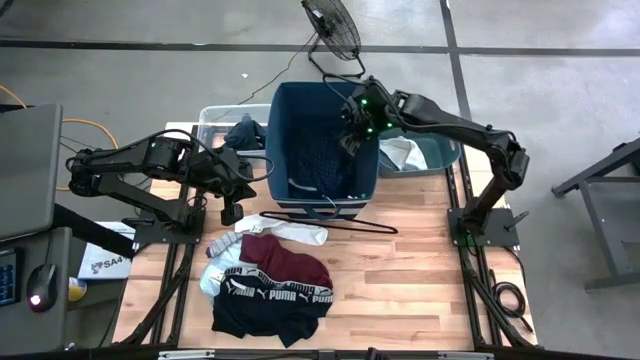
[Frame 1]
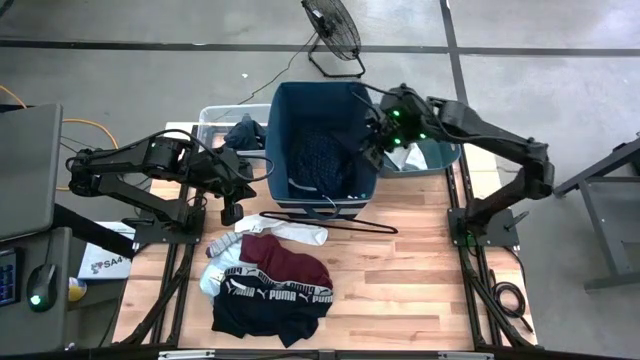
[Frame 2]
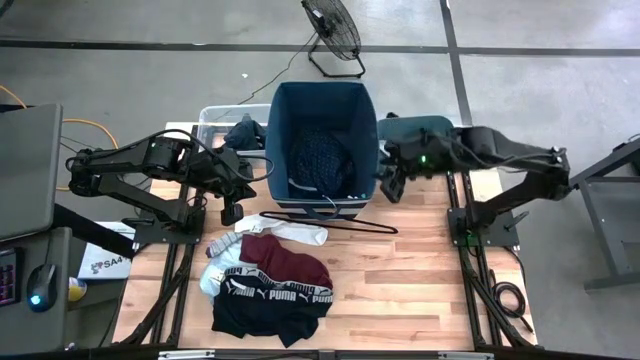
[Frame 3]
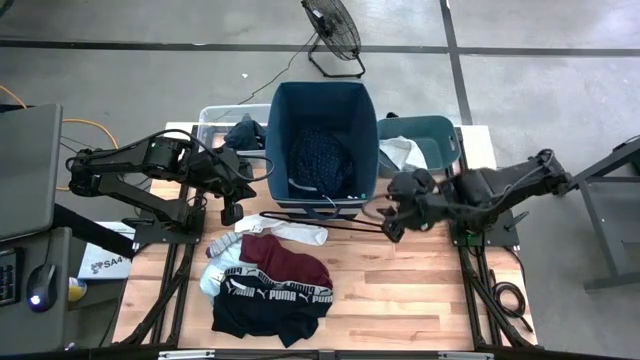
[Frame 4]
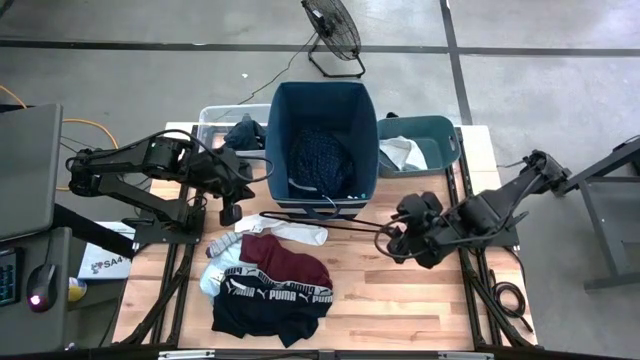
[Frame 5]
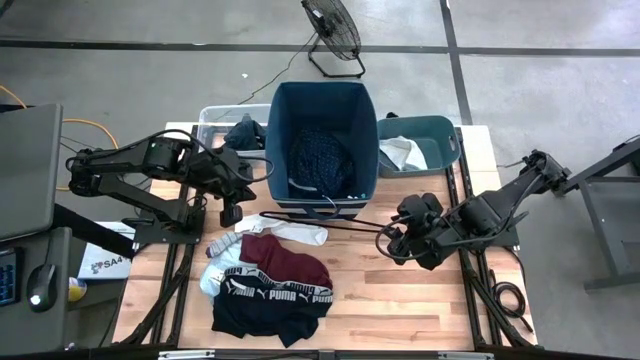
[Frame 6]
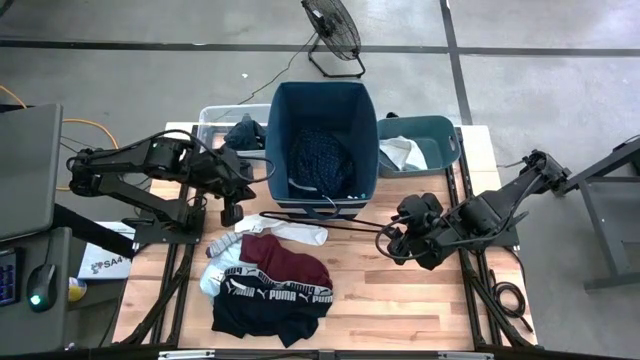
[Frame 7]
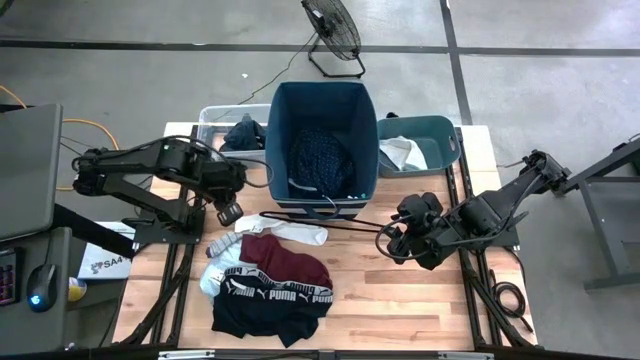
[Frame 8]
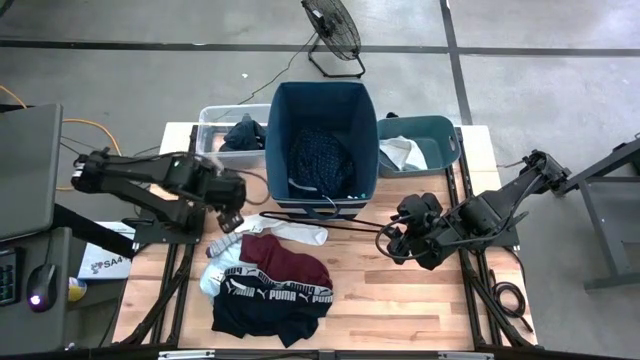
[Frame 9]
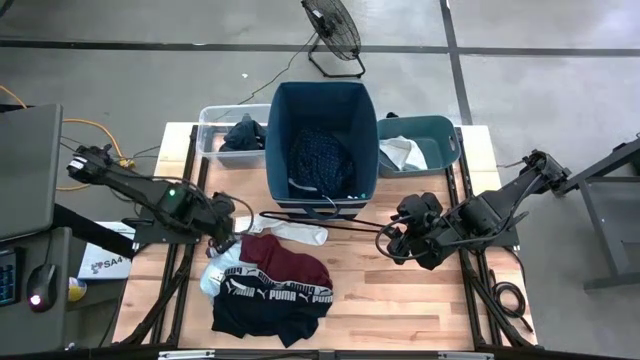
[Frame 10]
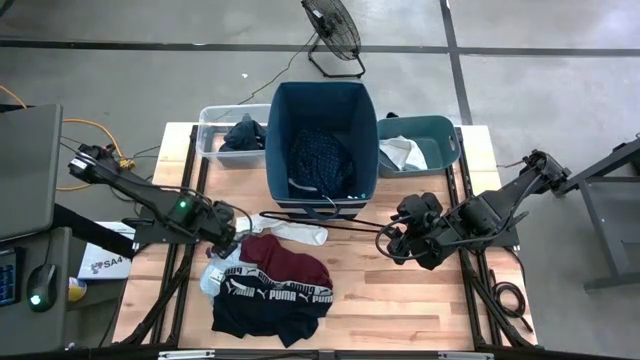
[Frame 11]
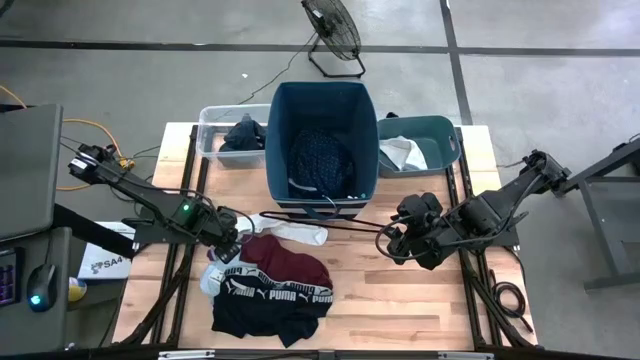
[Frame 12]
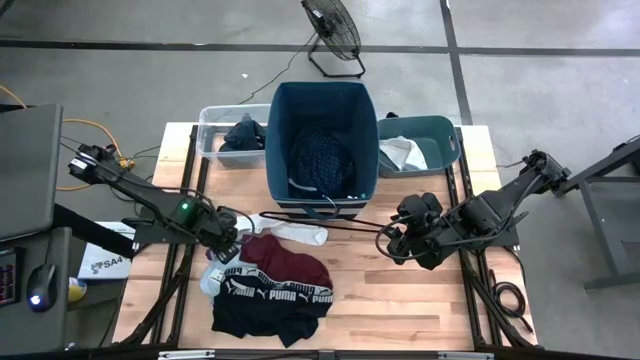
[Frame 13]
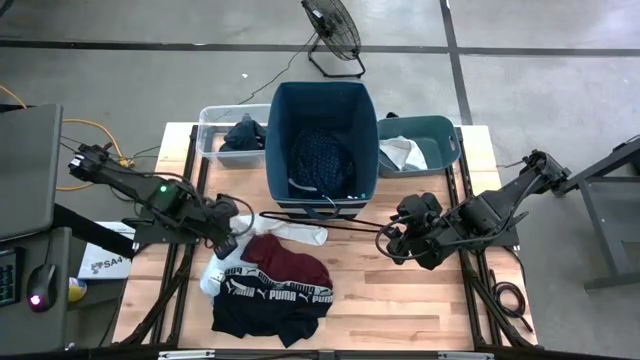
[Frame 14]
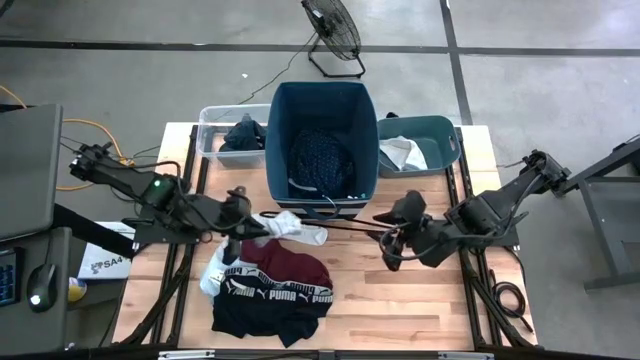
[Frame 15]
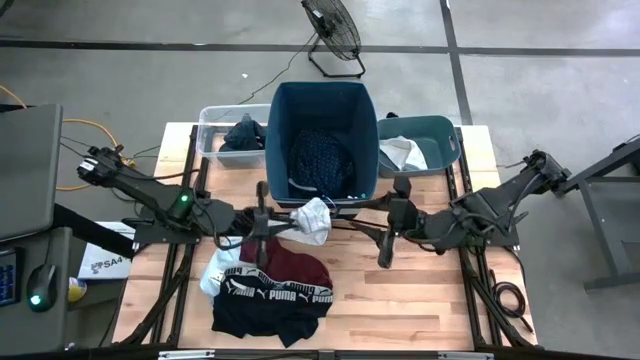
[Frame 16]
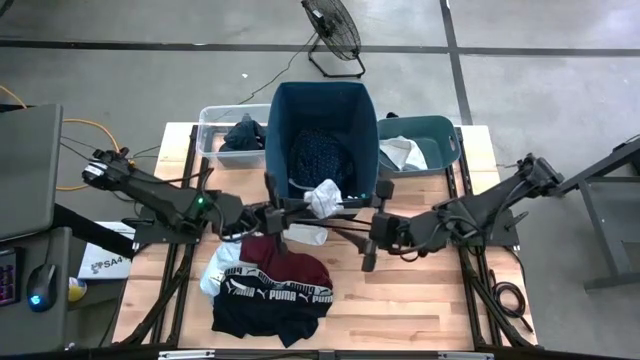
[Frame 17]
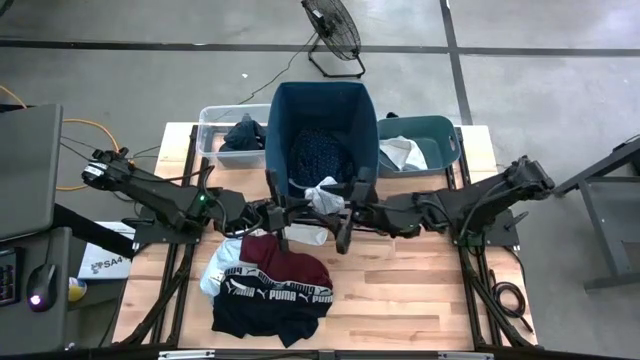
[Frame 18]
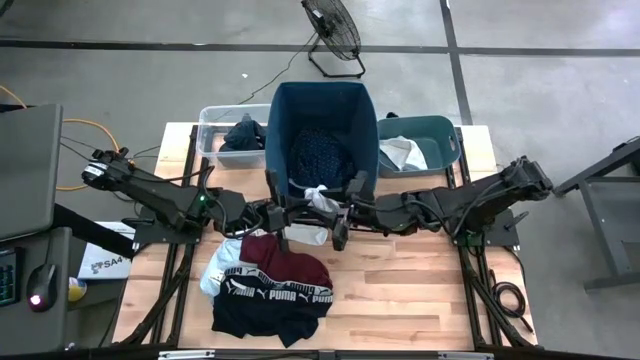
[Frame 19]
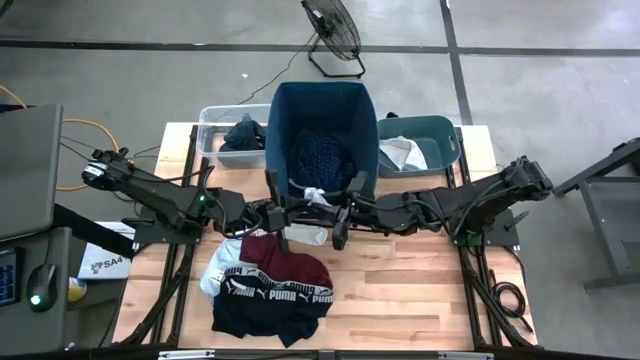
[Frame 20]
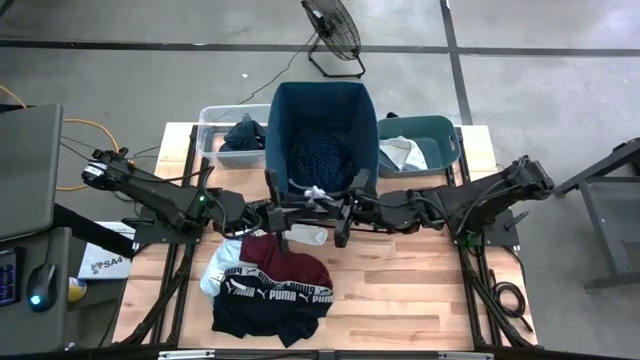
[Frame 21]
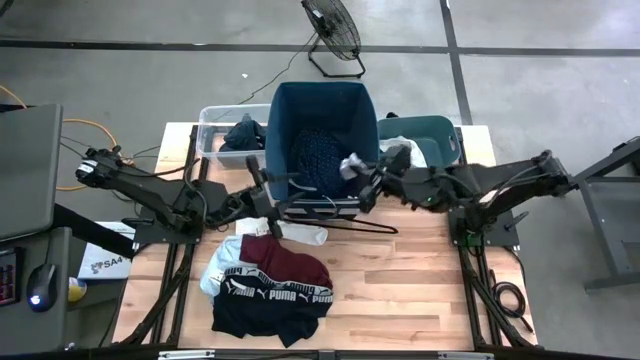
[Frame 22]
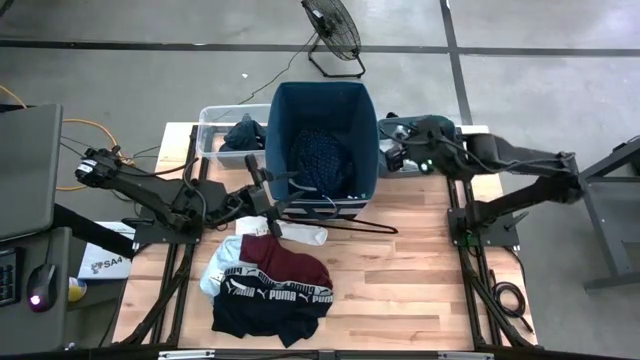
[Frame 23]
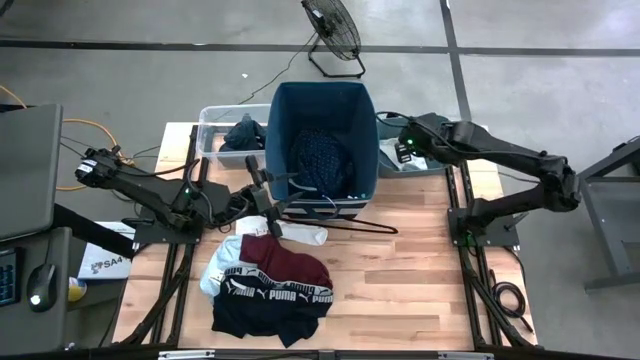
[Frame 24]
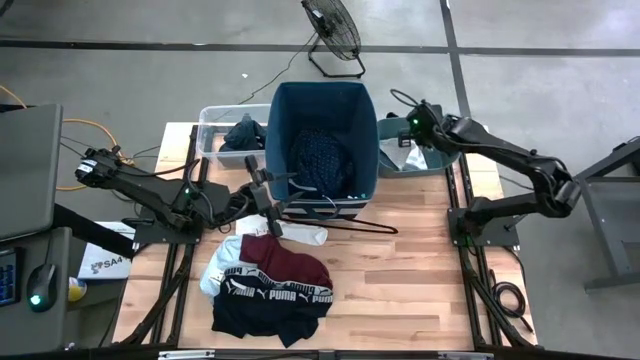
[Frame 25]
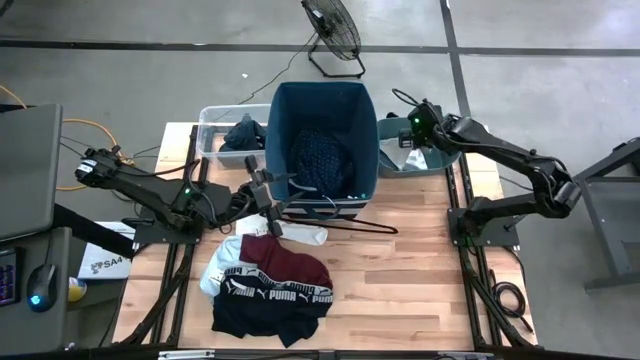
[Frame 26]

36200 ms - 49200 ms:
Task: Pick & Place Cloths
Put the gray sock into the green bin

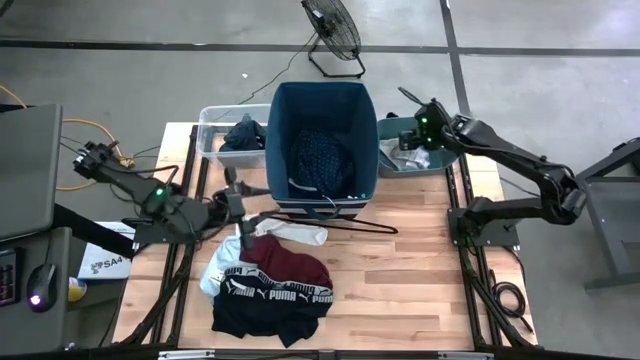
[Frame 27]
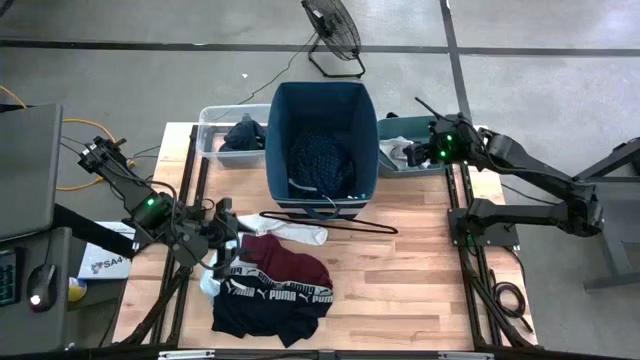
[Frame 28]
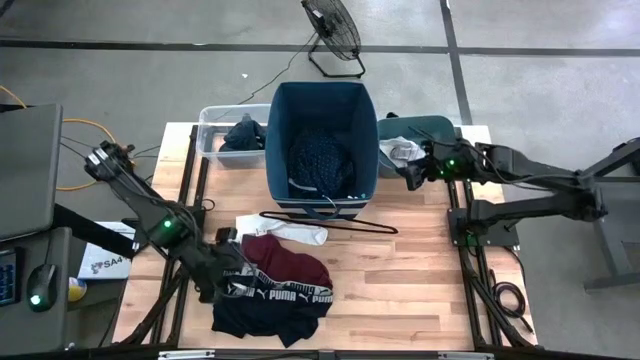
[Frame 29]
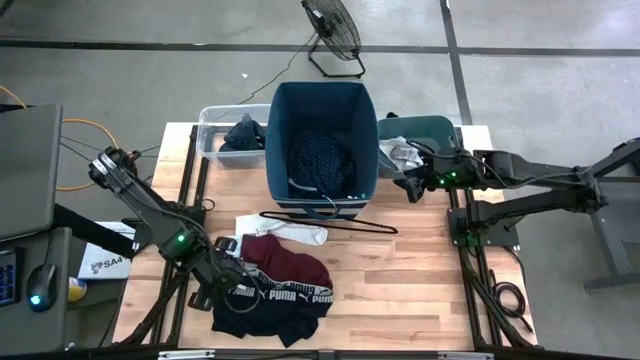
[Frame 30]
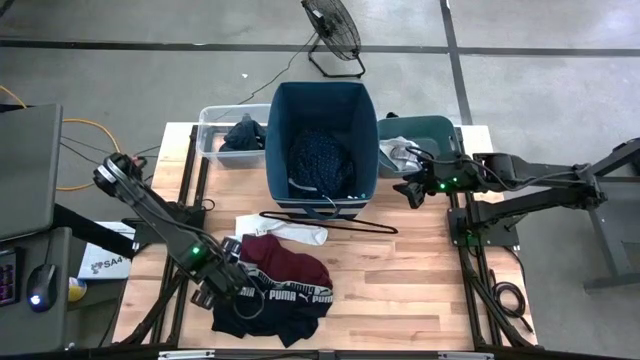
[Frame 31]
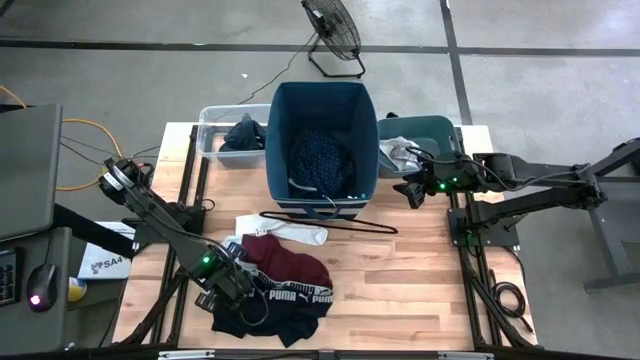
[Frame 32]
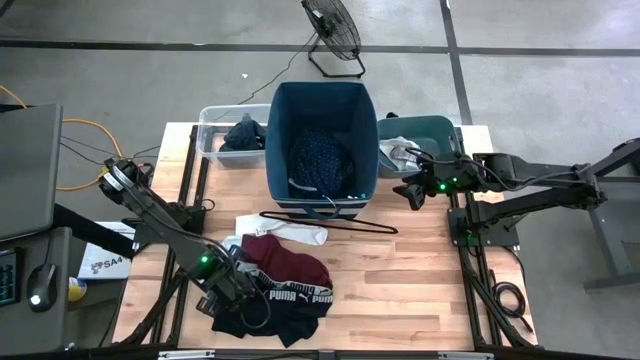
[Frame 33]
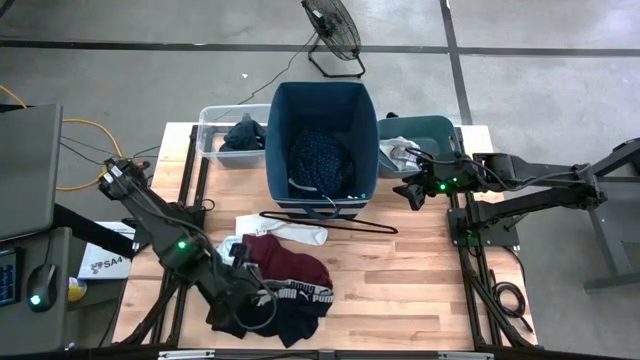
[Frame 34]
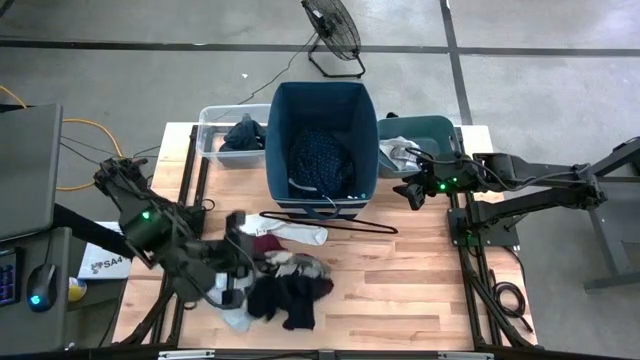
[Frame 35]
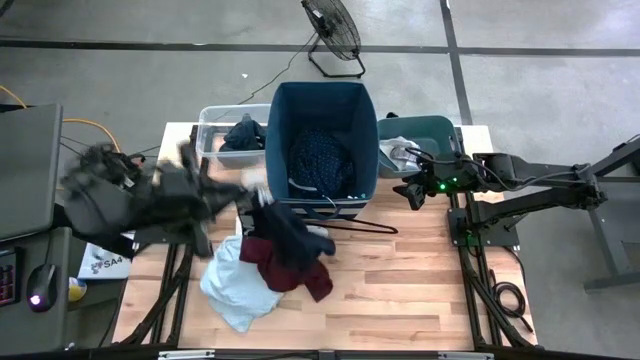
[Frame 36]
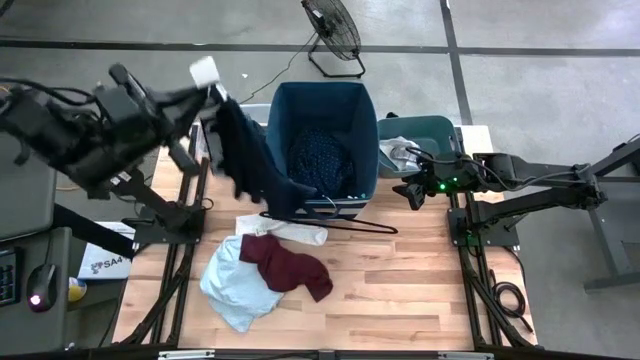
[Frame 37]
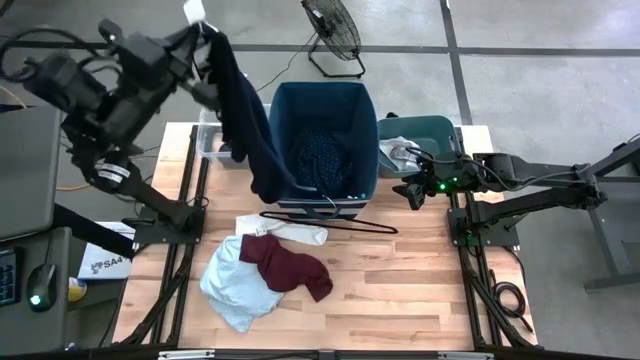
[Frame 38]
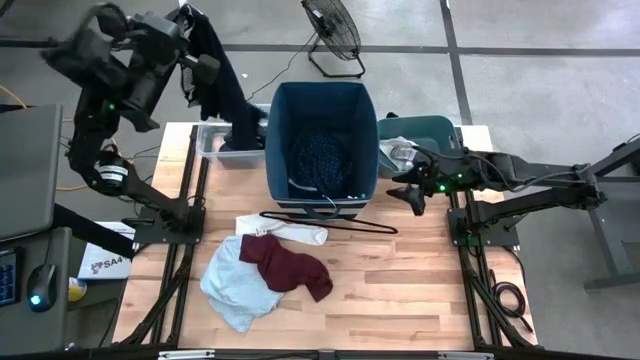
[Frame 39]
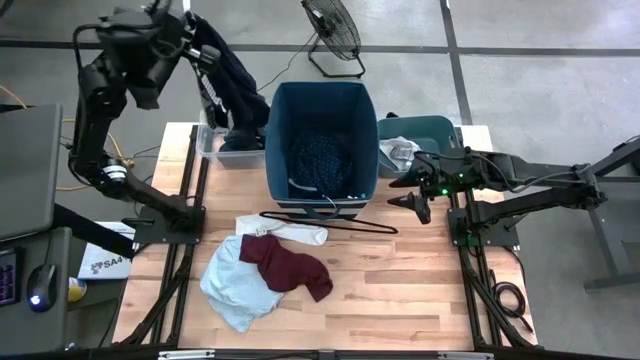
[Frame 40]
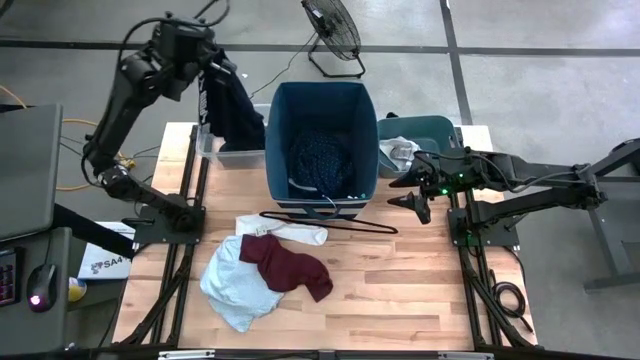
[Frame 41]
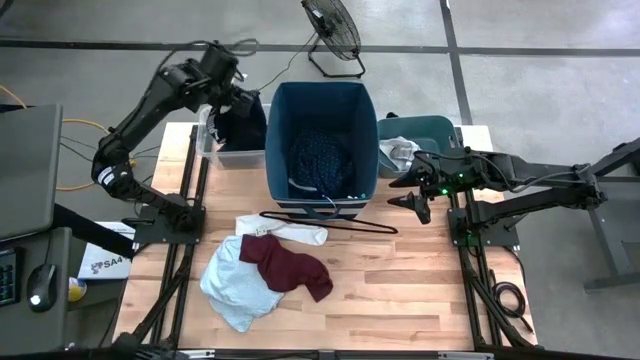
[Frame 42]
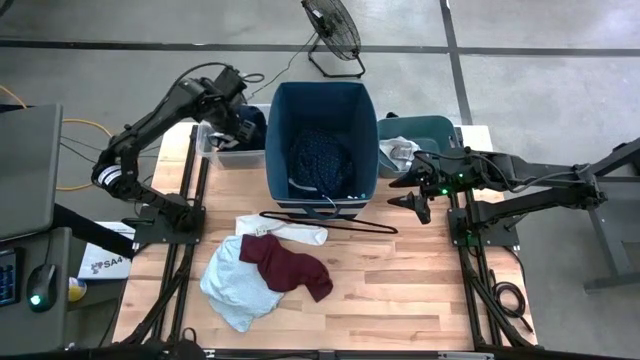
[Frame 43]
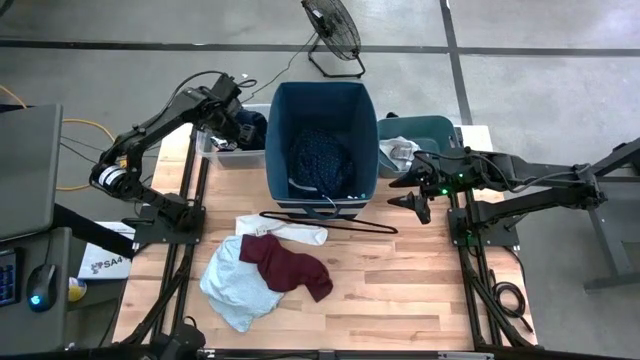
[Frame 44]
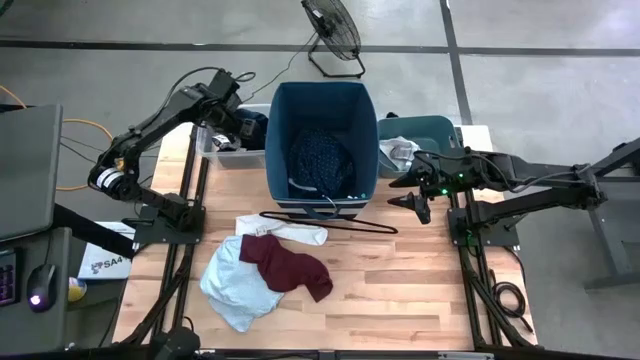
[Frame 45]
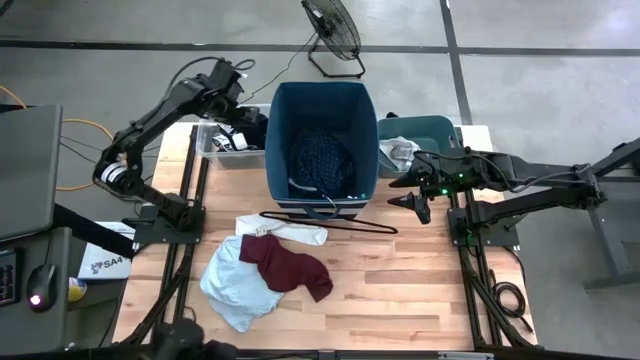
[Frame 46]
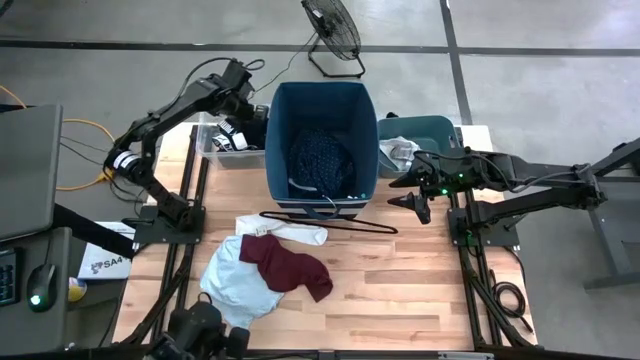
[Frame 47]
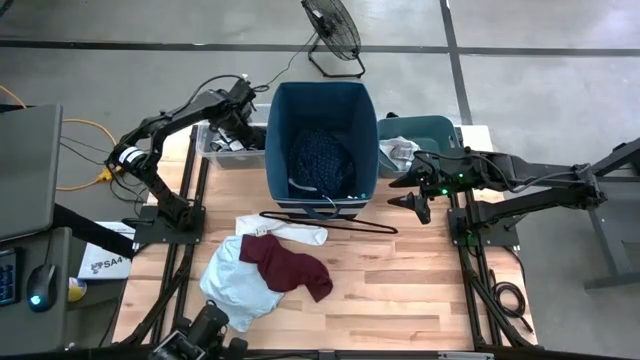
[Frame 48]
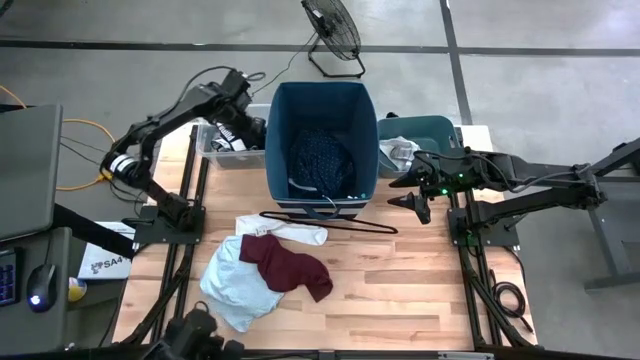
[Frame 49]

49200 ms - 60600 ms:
Put the blue boxer into the transparent bin
